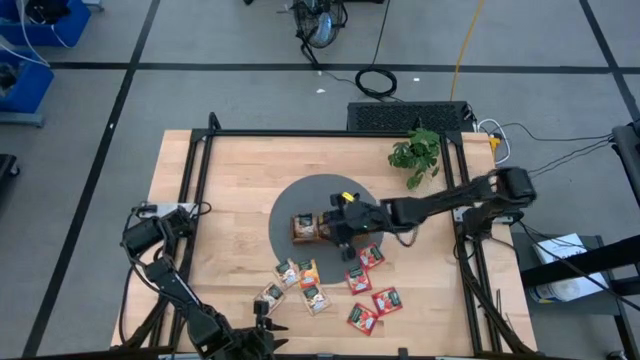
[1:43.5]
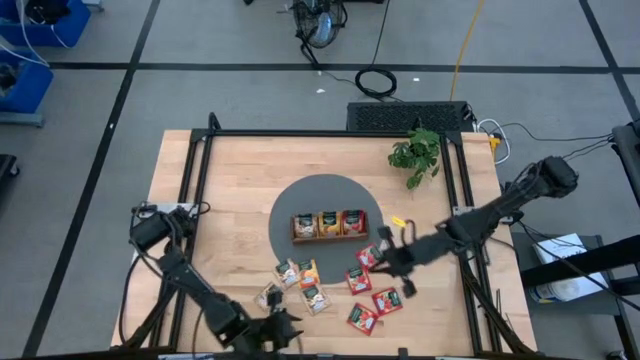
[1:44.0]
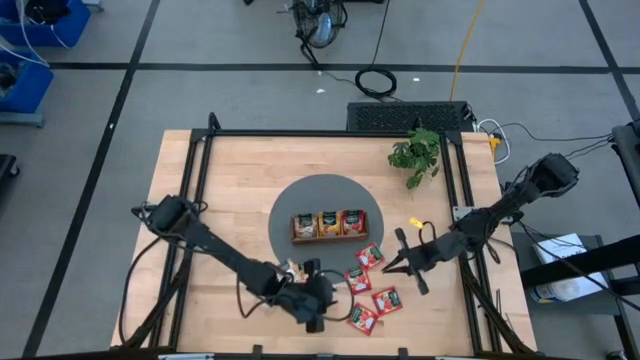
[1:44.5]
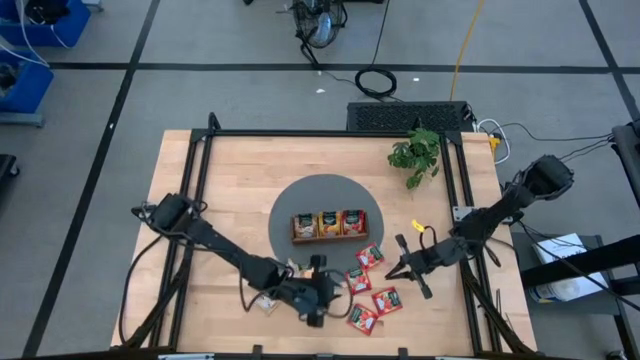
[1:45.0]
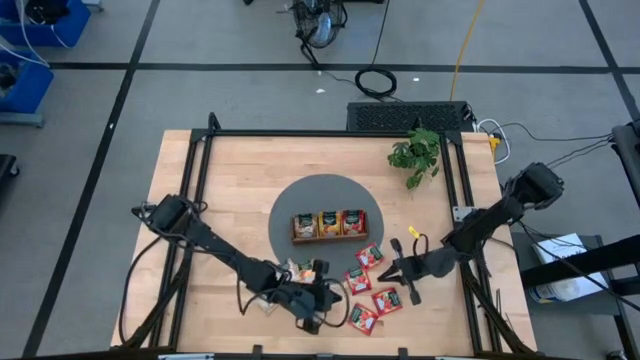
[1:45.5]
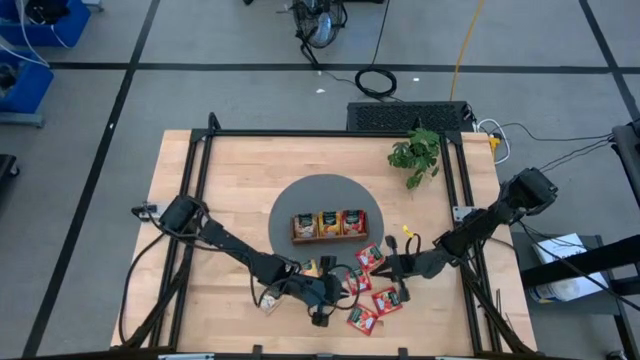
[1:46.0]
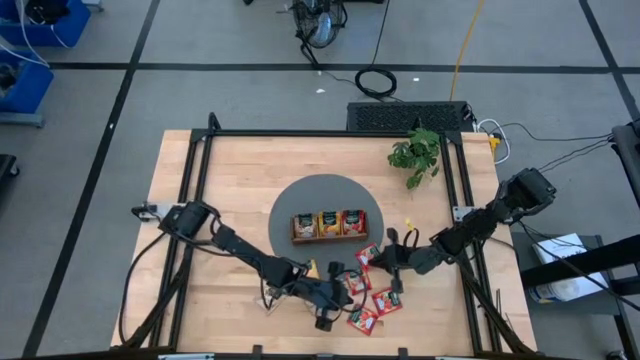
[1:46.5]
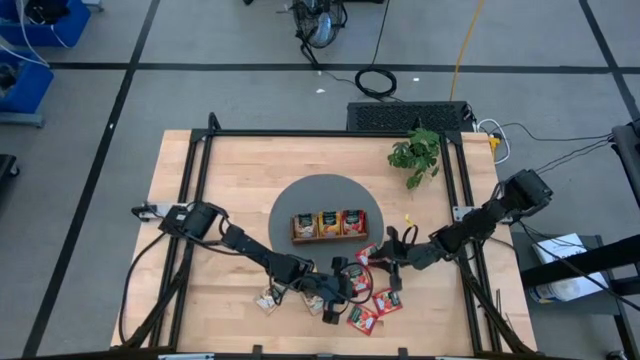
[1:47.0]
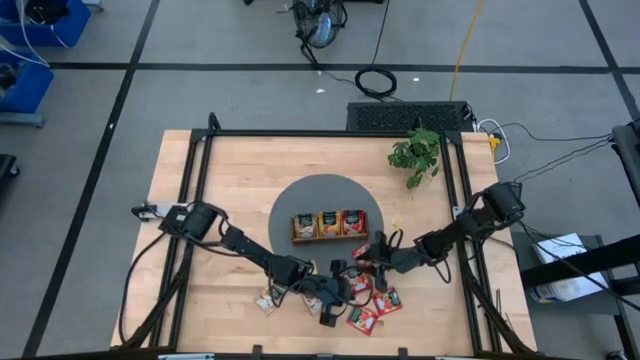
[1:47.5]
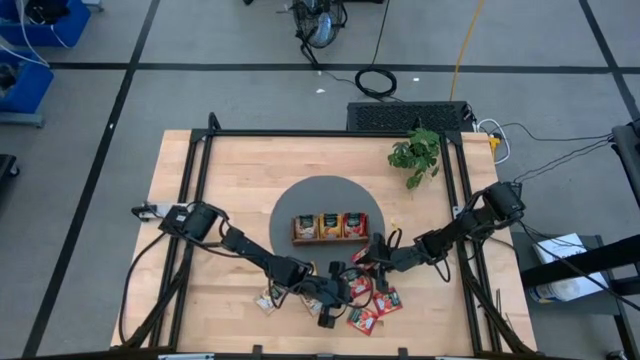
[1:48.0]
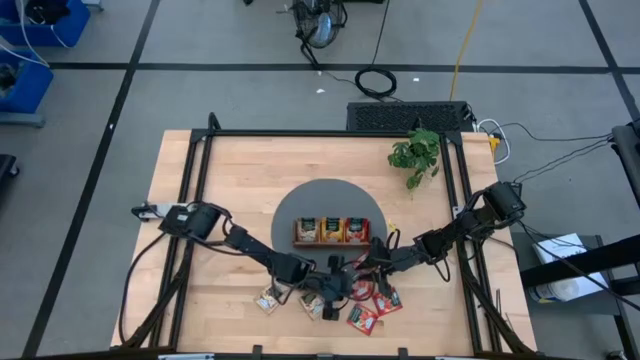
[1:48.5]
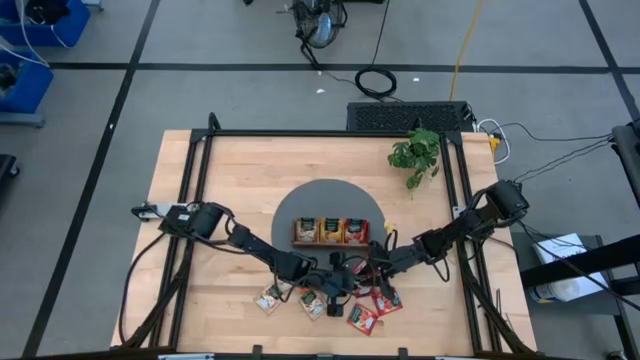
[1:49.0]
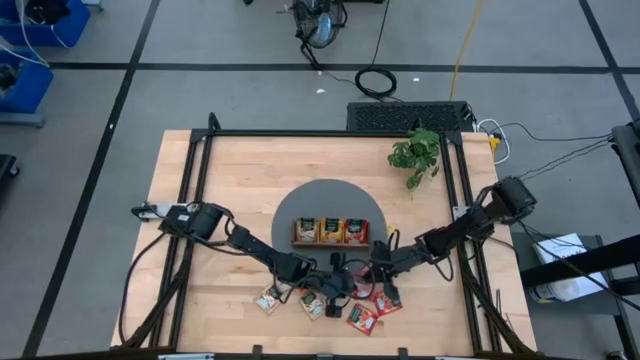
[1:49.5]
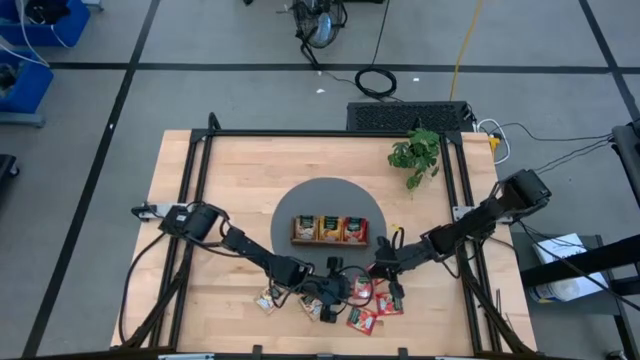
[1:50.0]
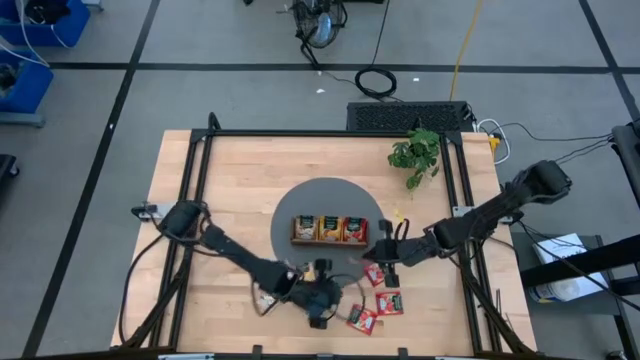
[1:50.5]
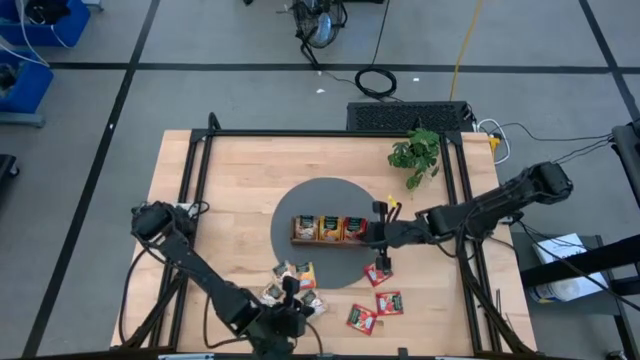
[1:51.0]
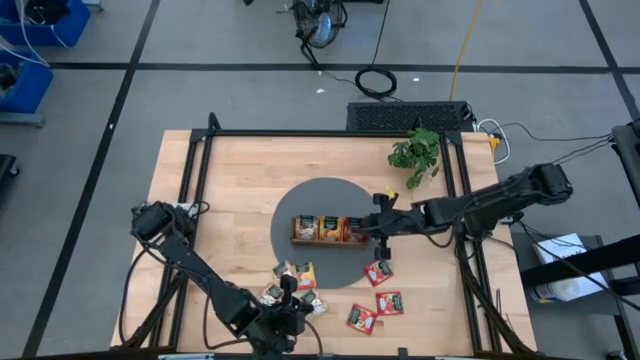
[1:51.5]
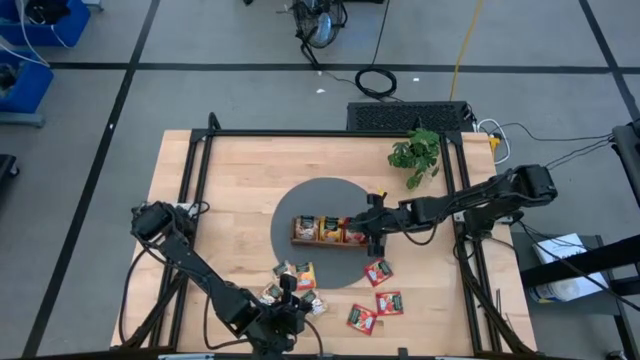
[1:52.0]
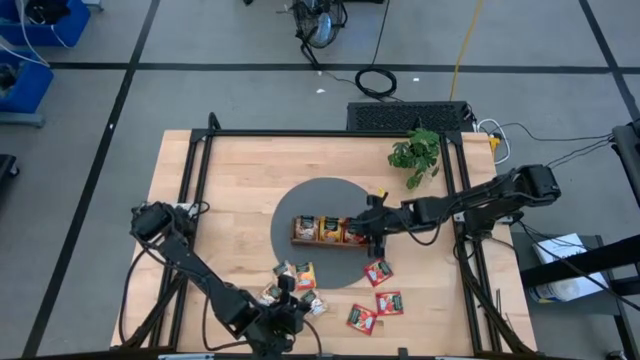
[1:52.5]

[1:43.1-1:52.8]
Task: Pick & Place Tea
Put the red tea bag into the right section of the wooden organizer

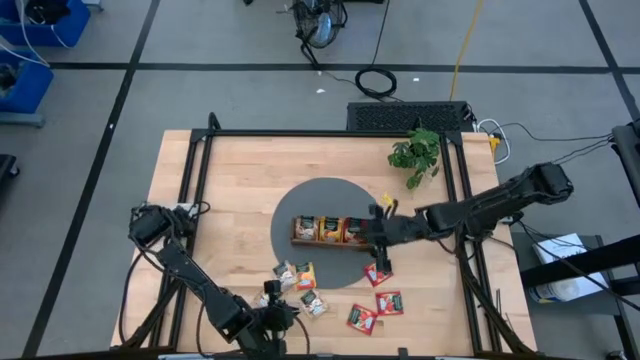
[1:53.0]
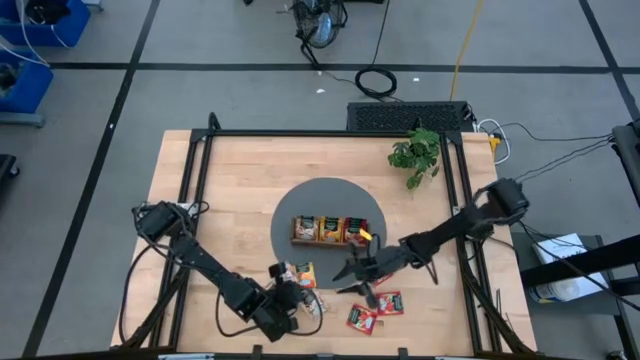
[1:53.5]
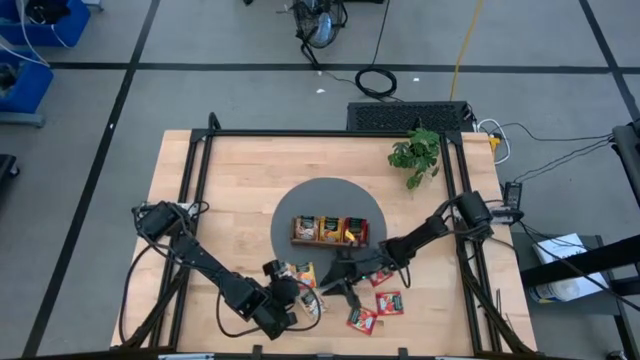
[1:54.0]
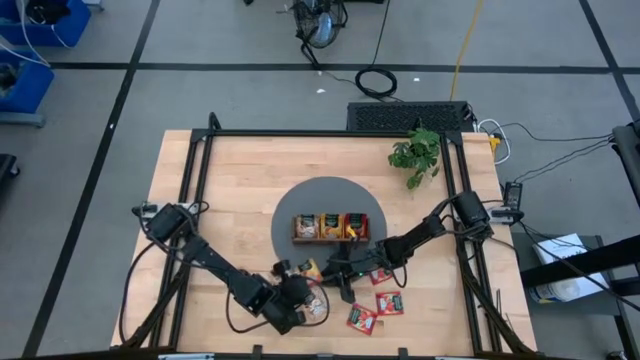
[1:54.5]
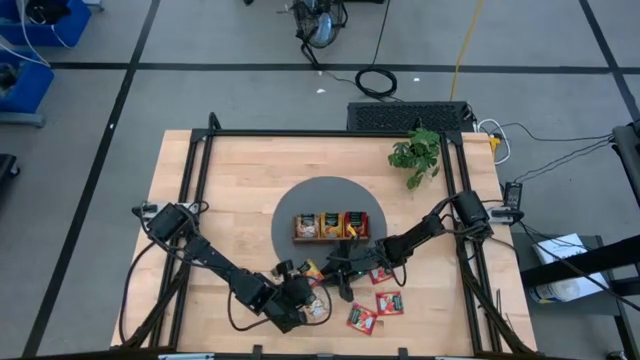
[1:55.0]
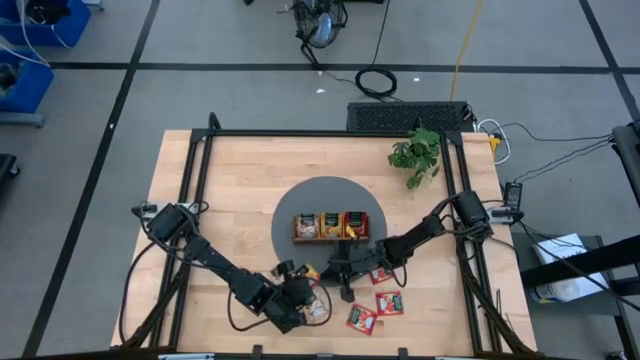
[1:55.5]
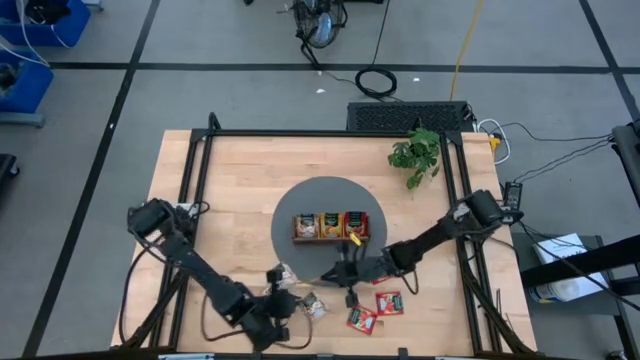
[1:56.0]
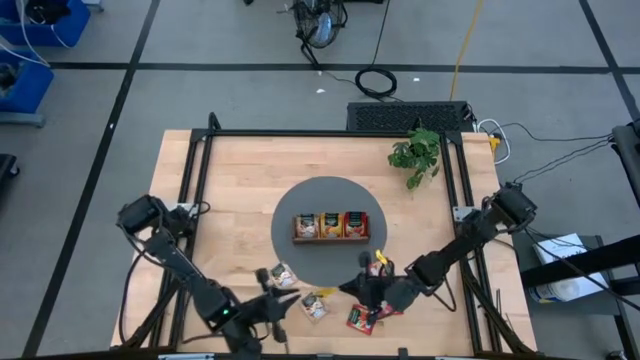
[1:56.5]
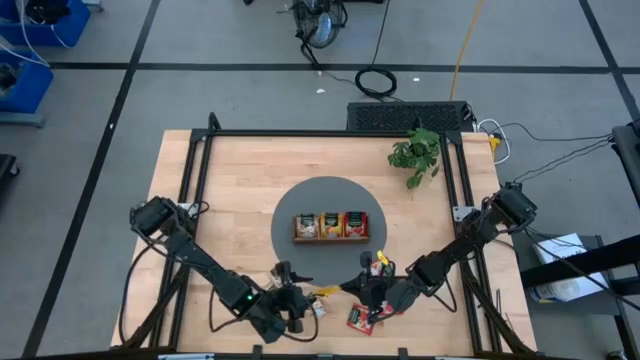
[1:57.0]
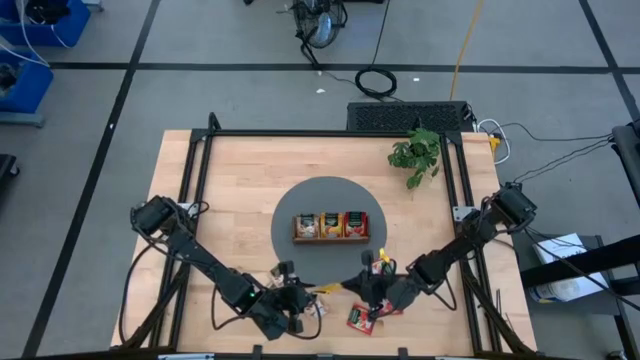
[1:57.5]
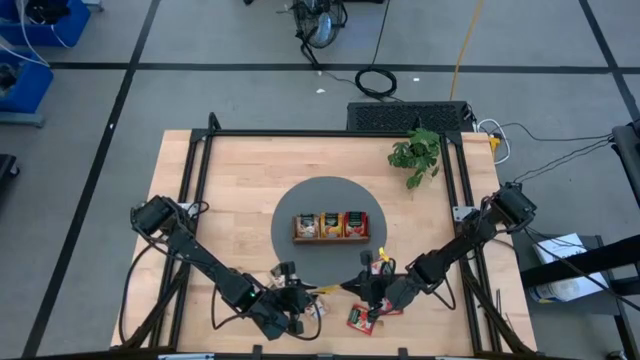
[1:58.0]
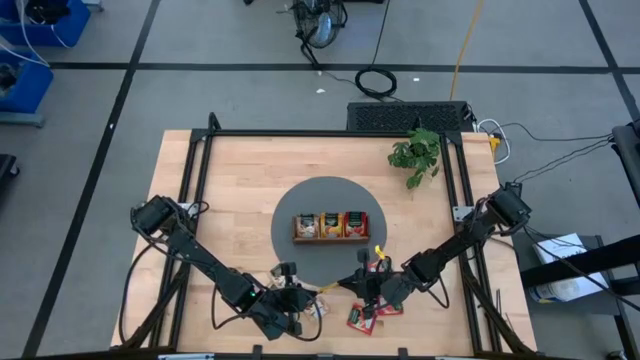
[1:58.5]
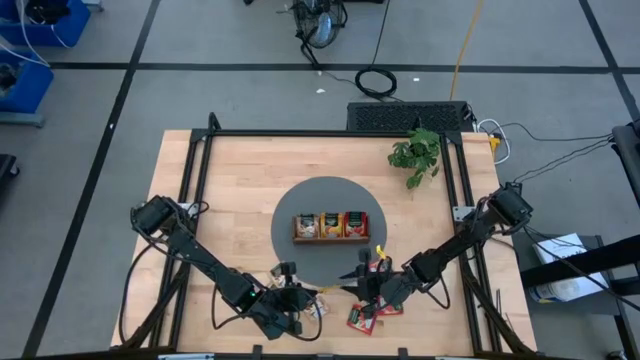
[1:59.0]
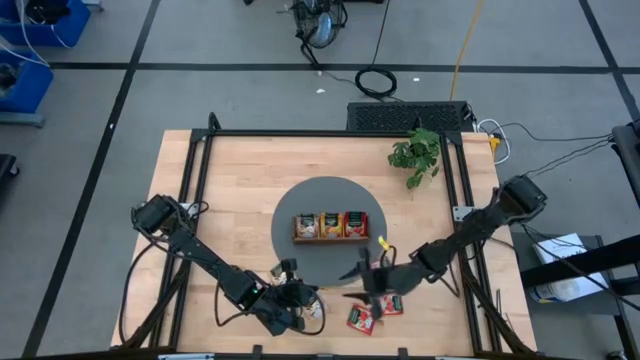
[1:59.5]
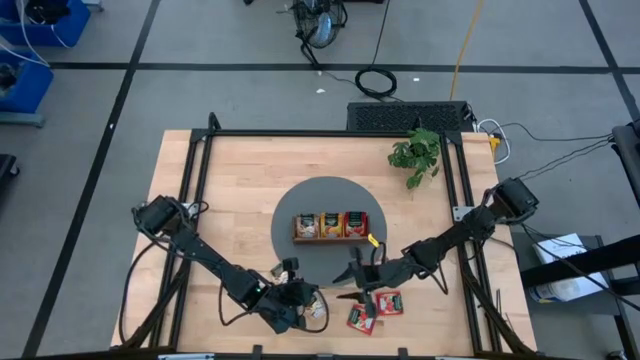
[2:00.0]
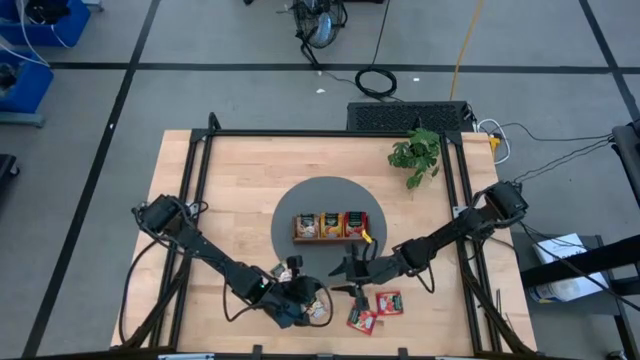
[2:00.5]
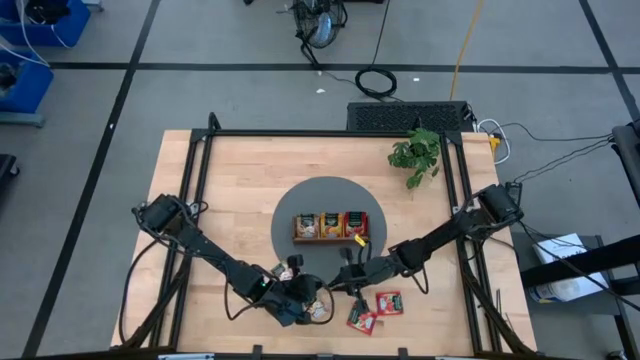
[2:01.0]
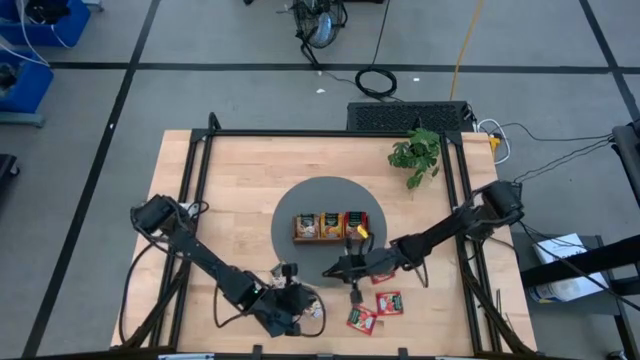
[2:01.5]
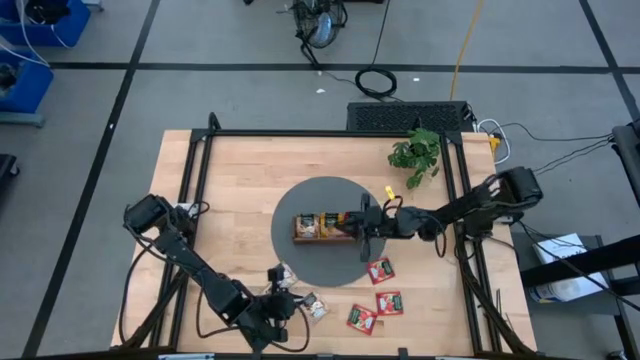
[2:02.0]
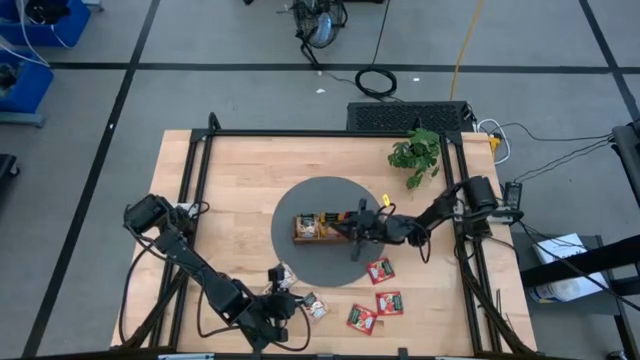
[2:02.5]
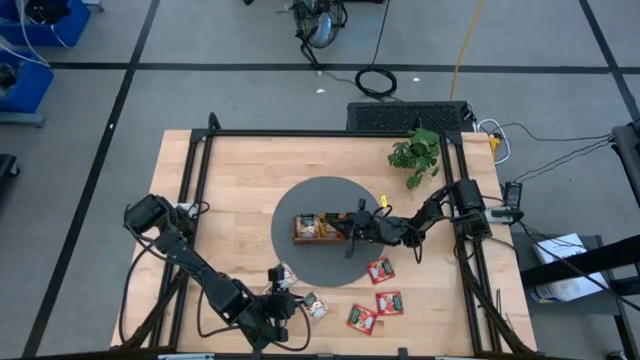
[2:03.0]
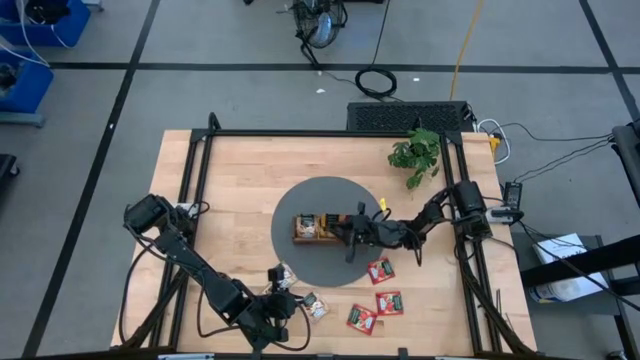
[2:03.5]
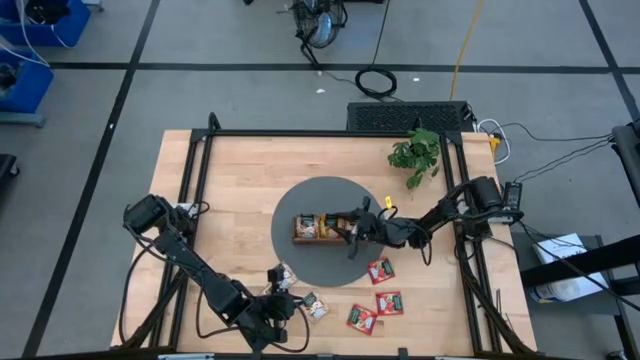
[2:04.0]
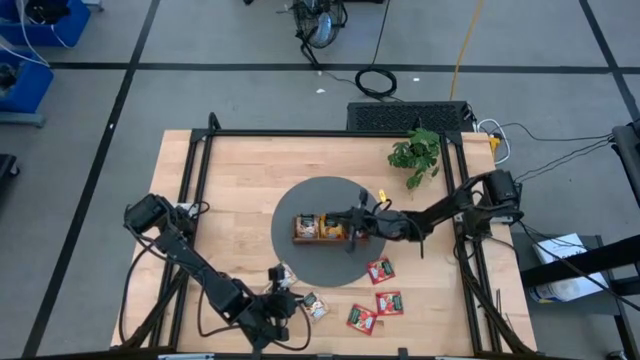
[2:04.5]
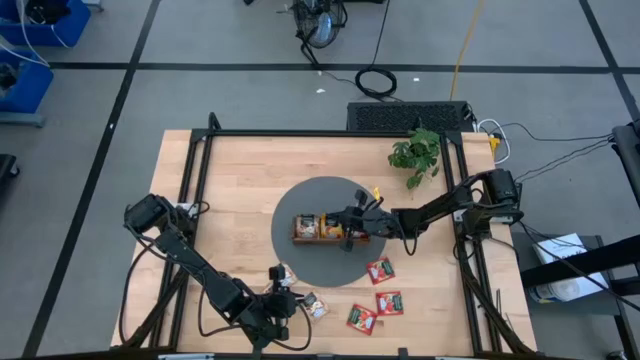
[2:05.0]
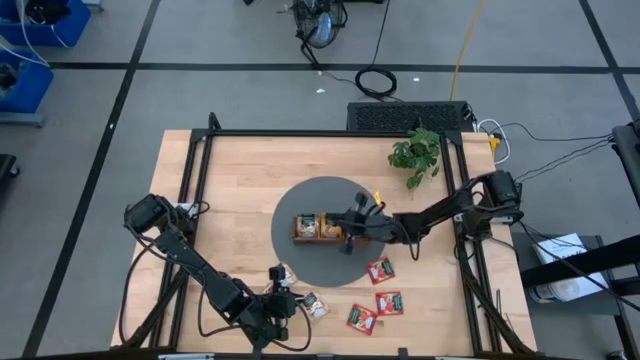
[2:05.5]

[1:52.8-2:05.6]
Put the yellow tea bag into the middle section of the wooden organizer
